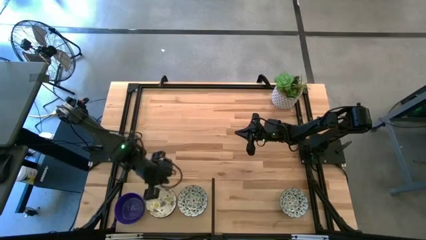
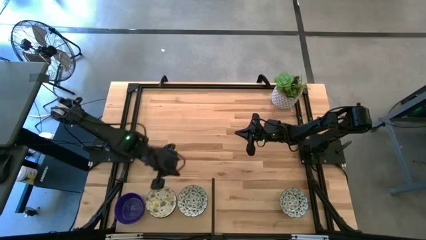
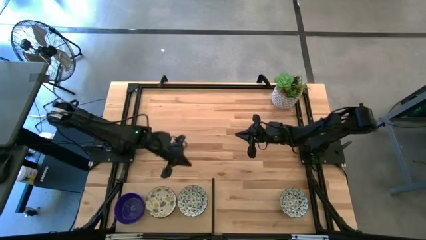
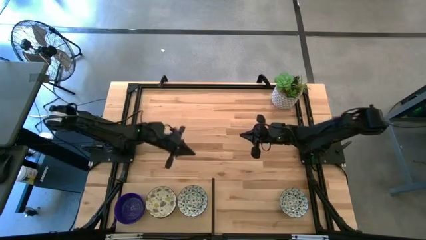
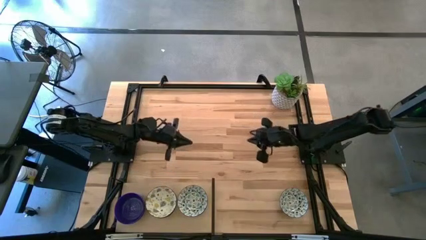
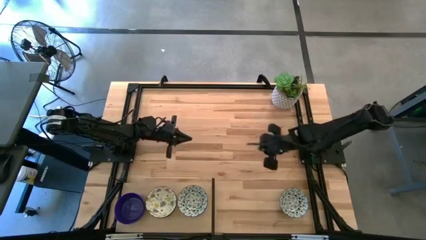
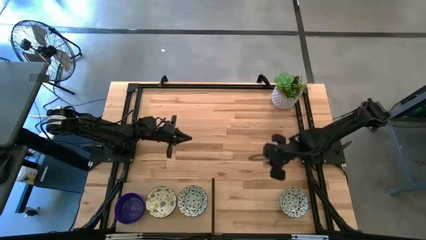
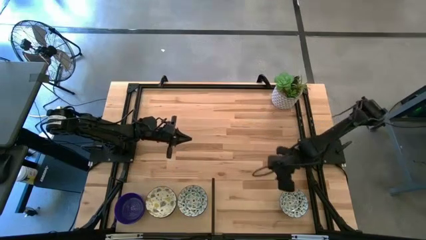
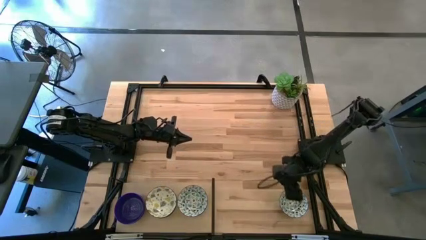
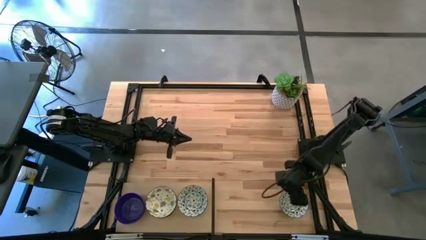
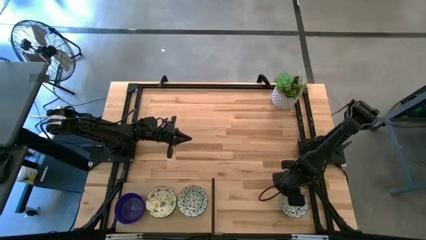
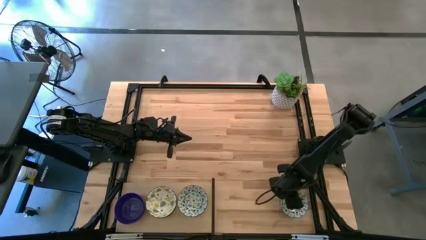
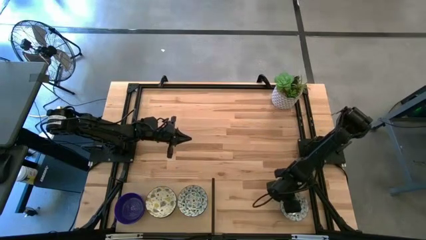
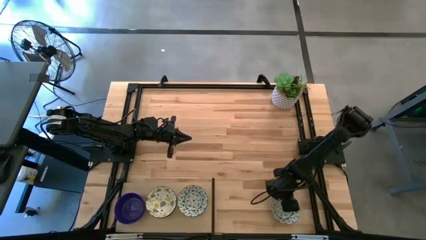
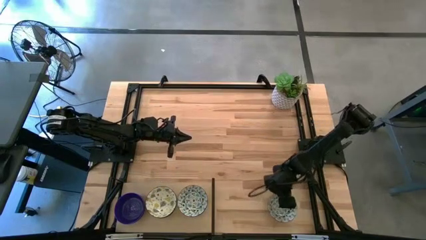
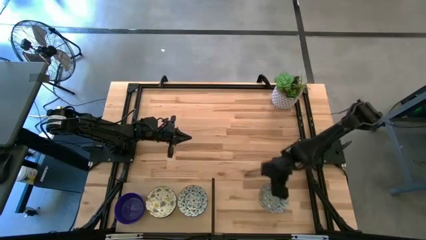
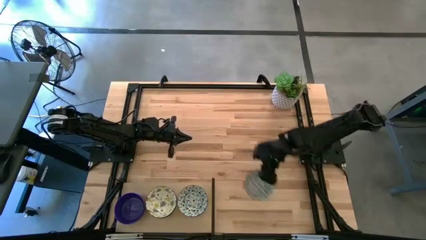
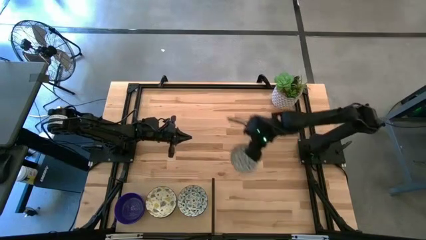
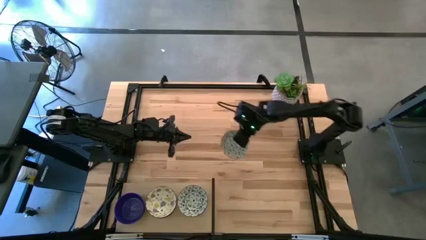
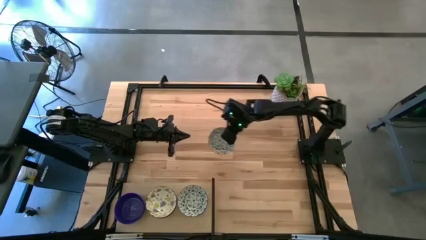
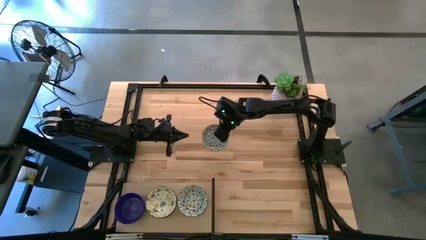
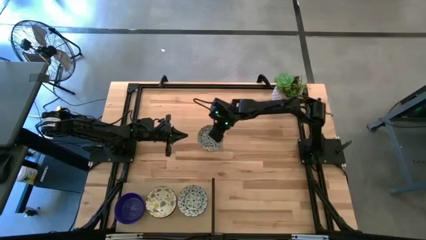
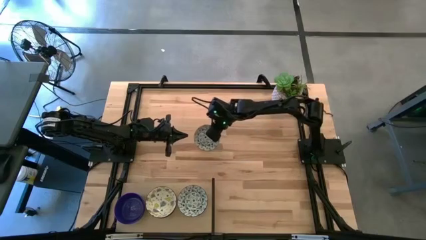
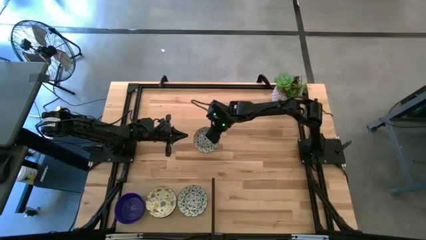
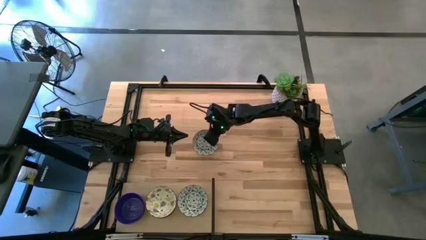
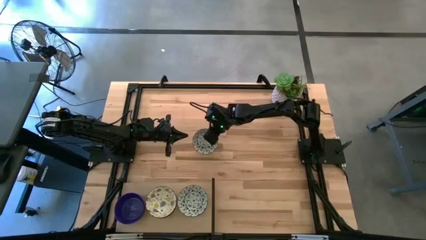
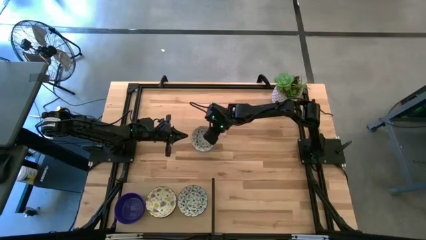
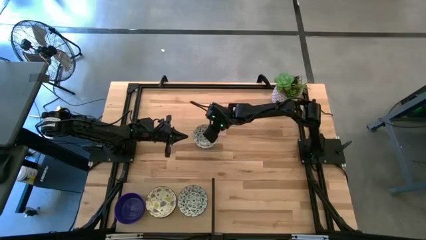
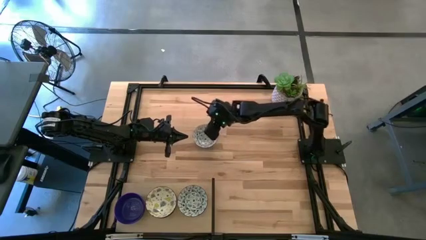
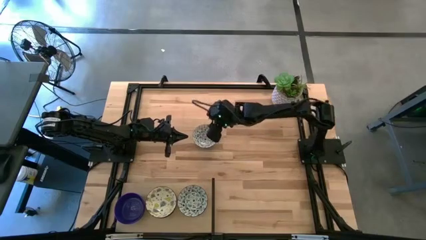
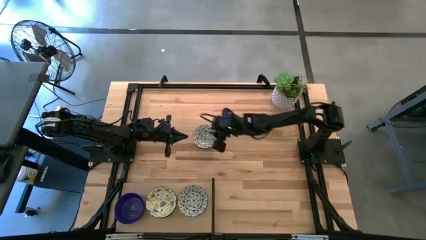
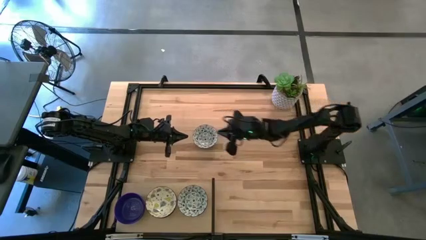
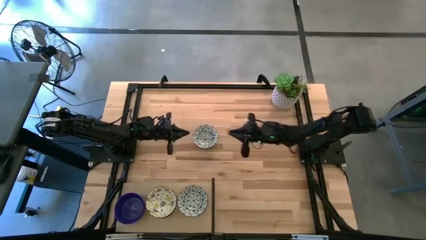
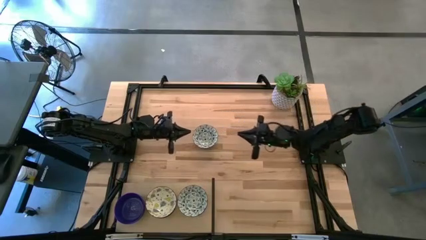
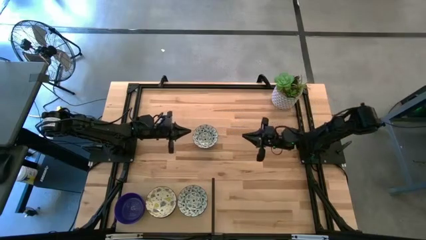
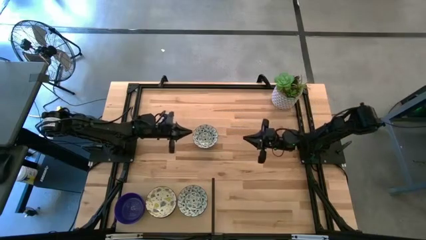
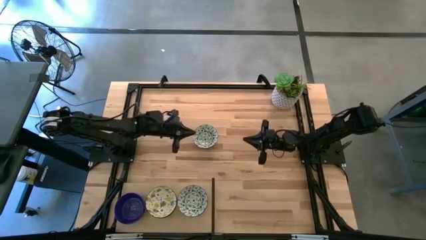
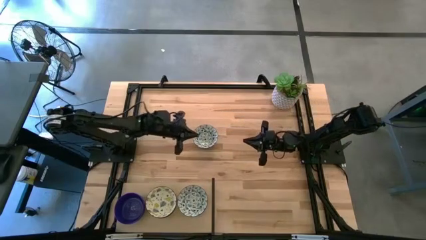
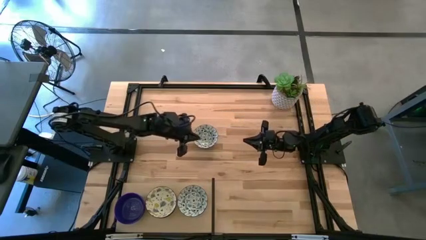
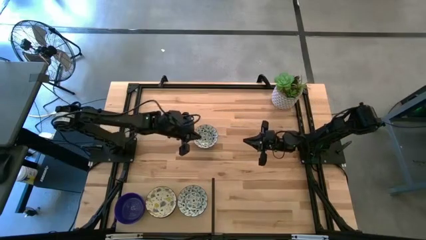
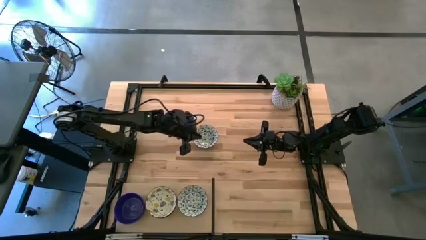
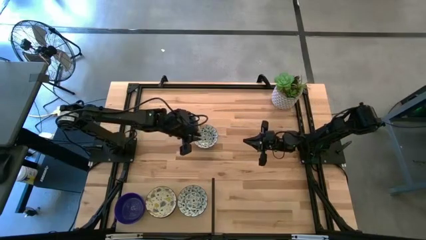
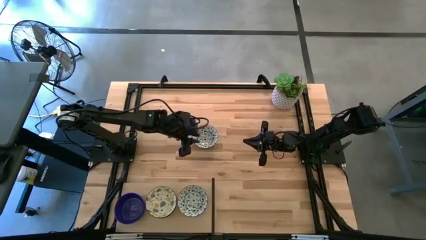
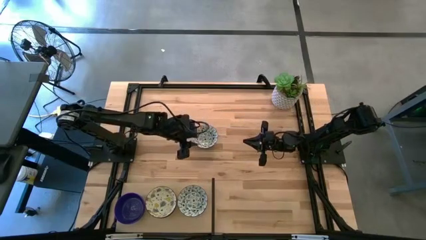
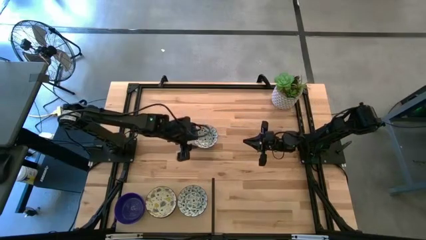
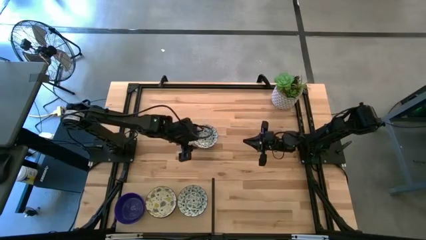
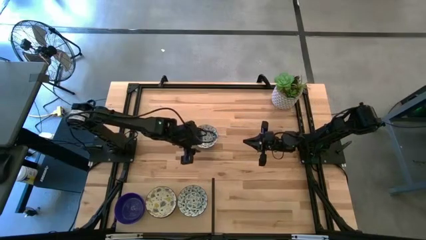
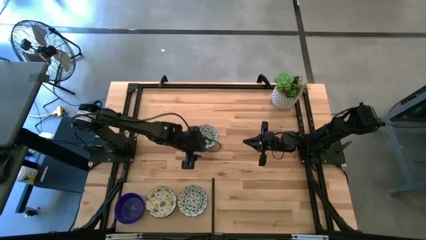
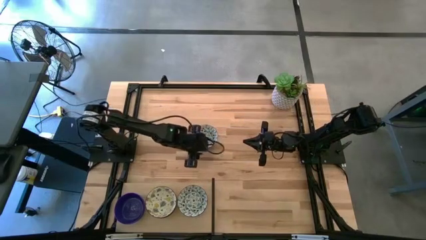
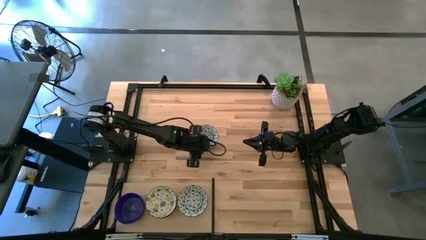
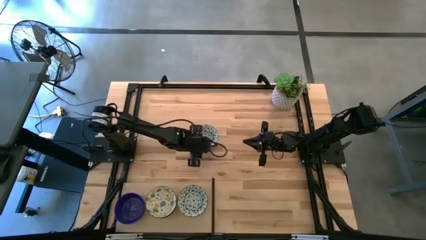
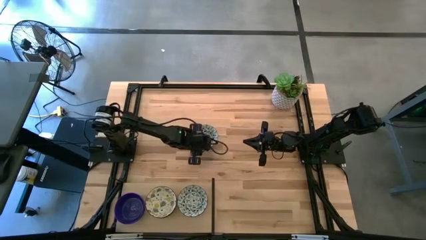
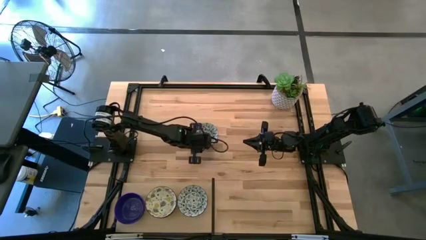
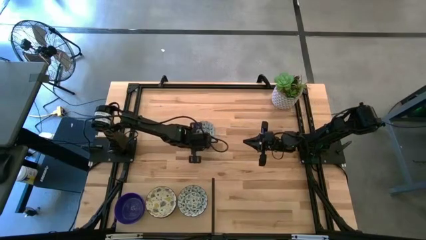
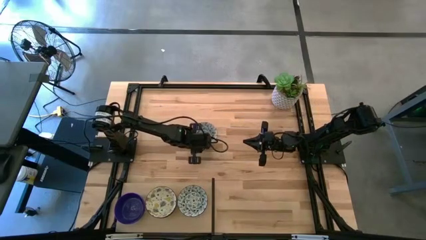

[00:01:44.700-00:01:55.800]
Task: Pick & Place Mini bowls
Stack the blue patterned bowl on top of the other stacked blue patterned bowls on the shelf

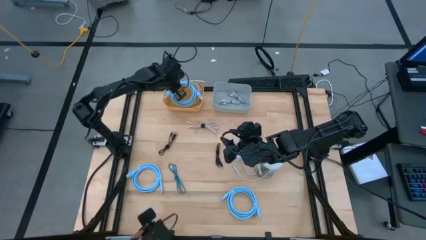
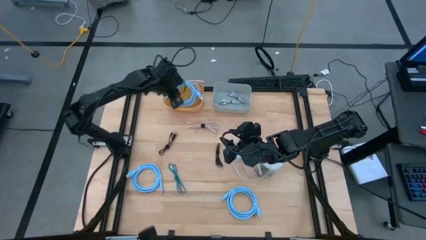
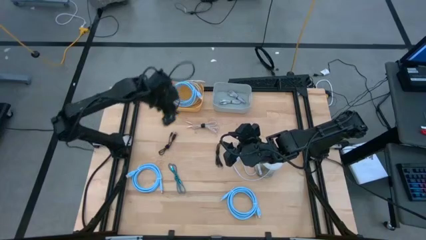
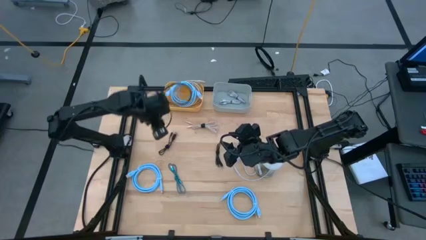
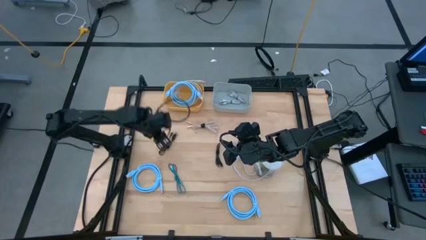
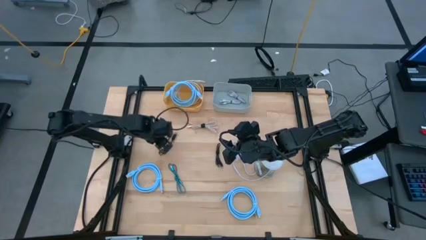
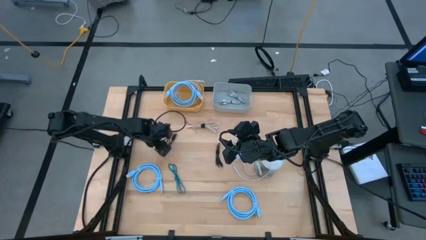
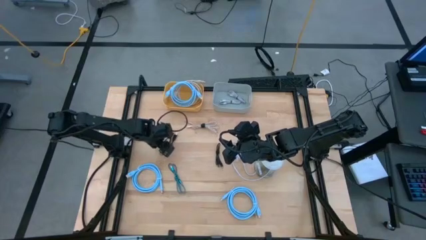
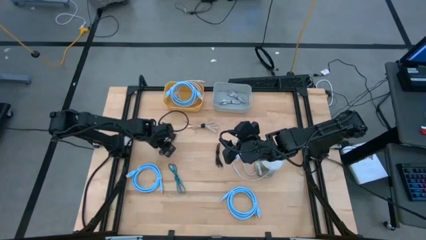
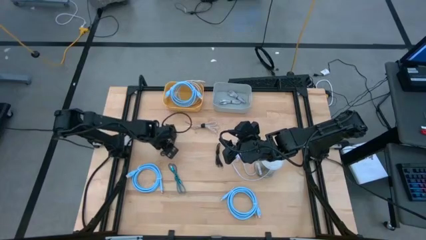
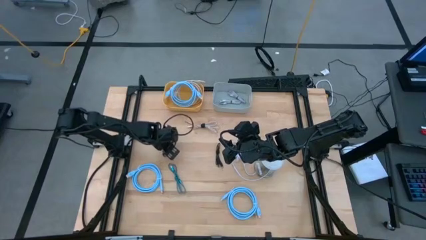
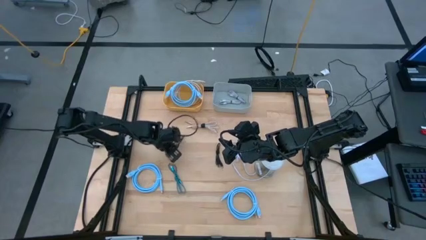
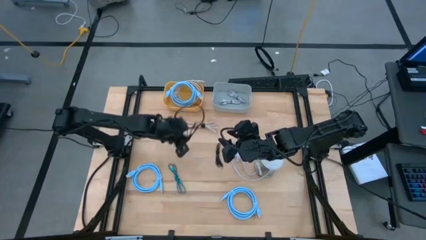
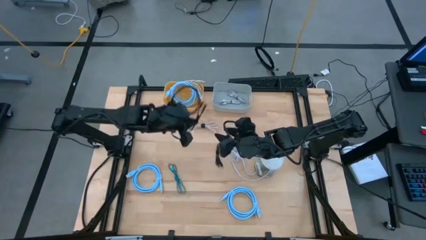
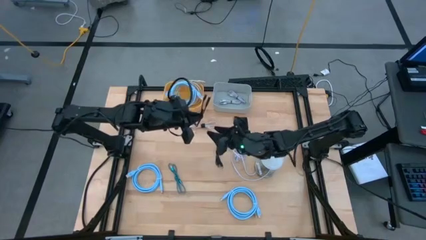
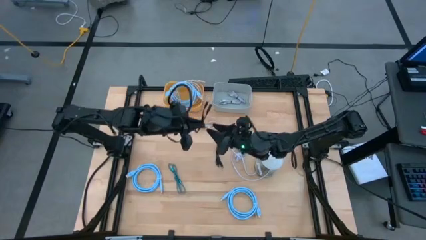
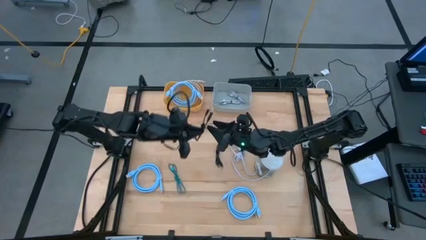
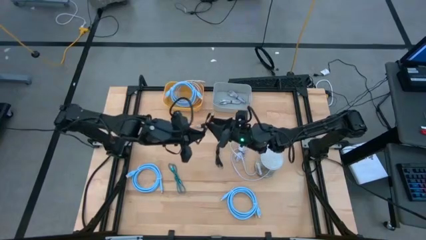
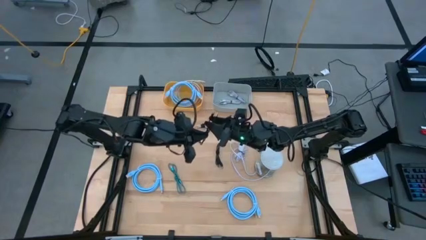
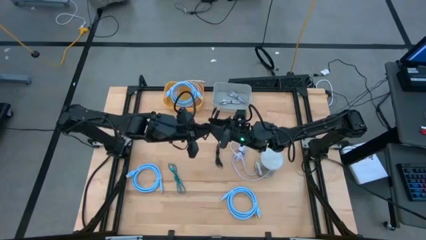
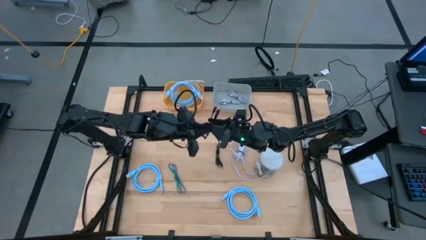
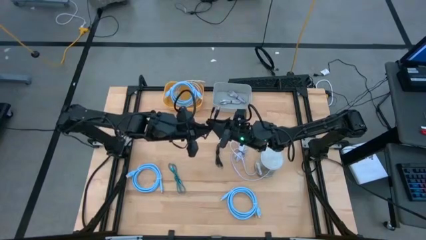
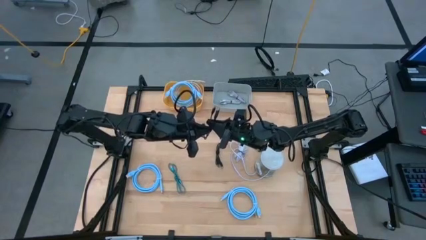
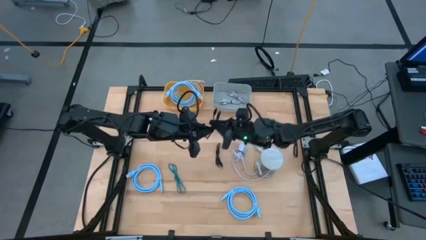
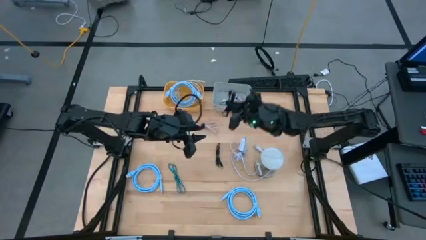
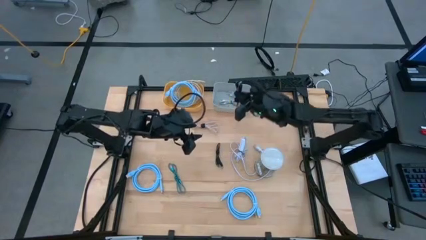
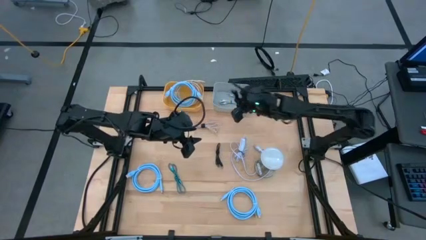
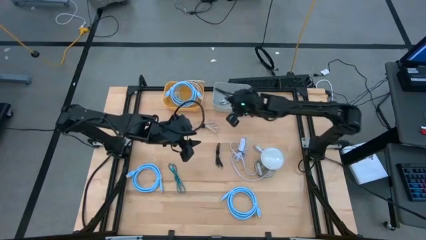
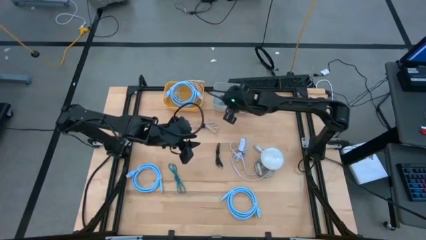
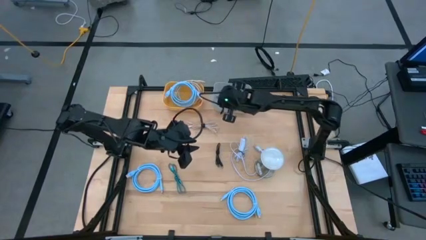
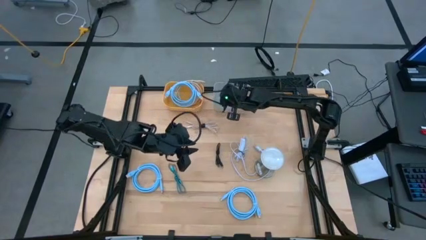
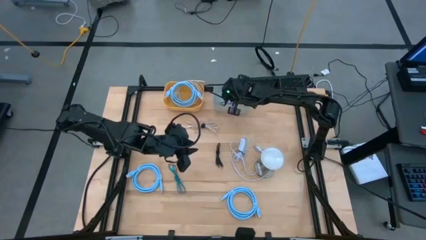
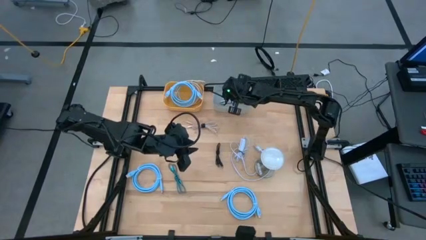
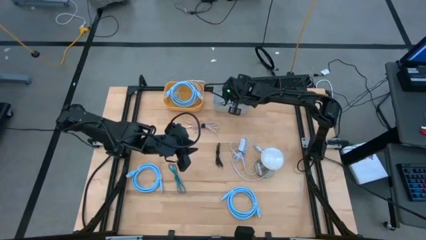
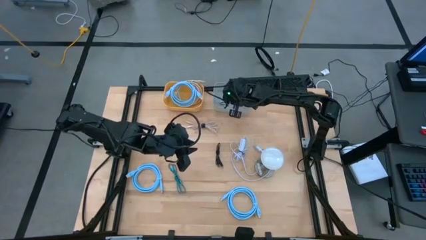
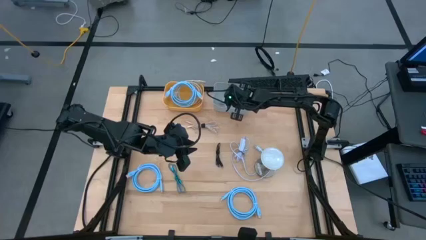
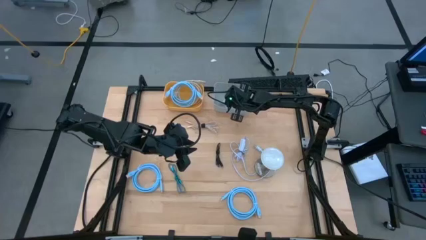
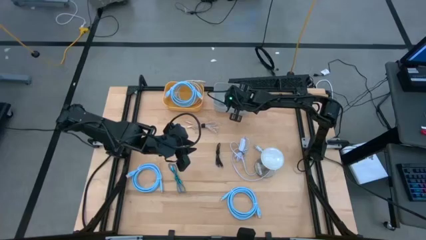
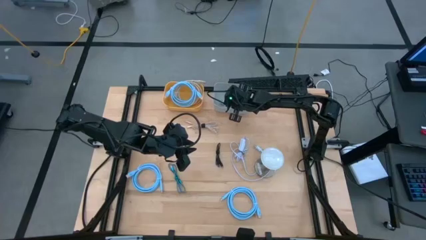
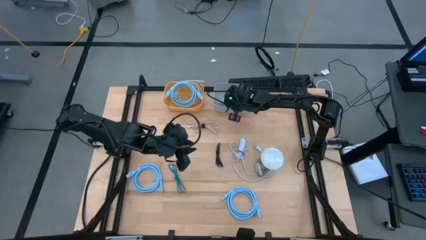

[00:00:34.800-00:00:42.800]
Task: Pick & Place USB Port
Put the left black charger cable into the gray bin
